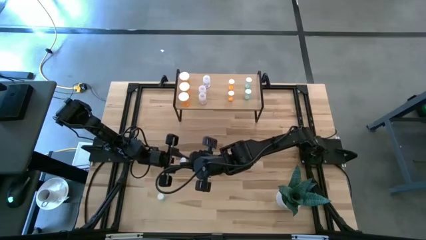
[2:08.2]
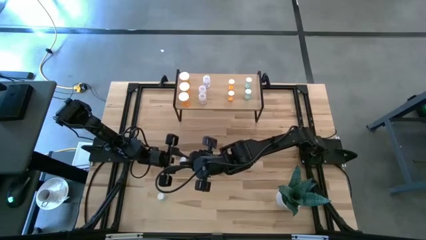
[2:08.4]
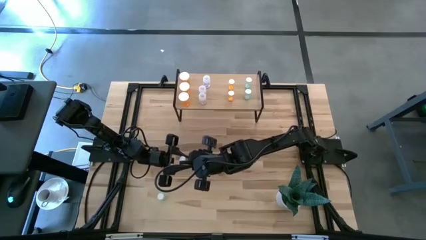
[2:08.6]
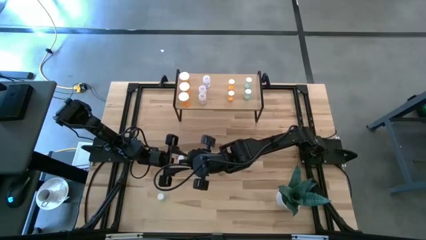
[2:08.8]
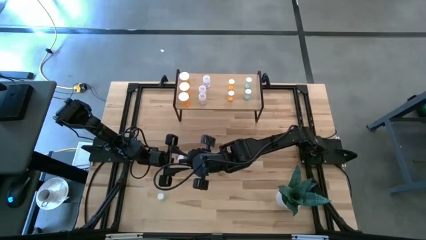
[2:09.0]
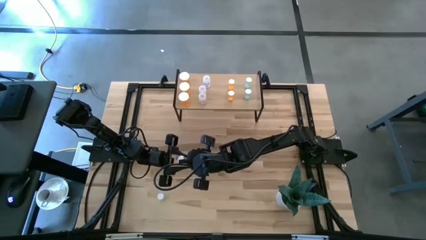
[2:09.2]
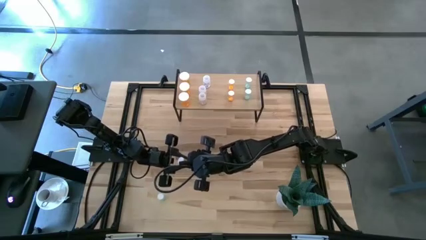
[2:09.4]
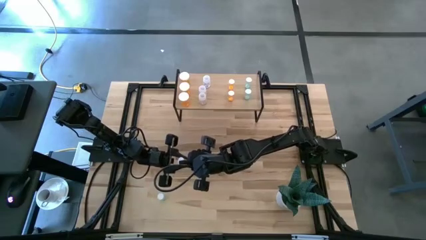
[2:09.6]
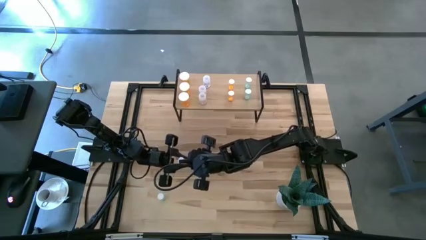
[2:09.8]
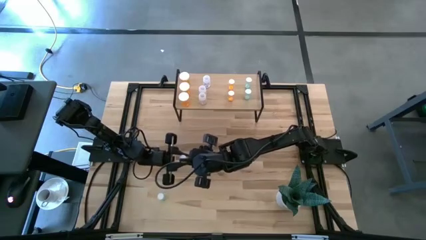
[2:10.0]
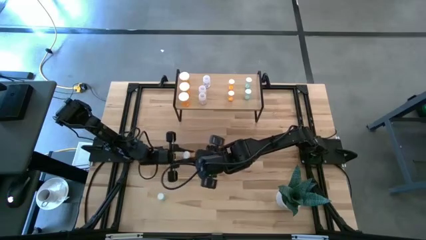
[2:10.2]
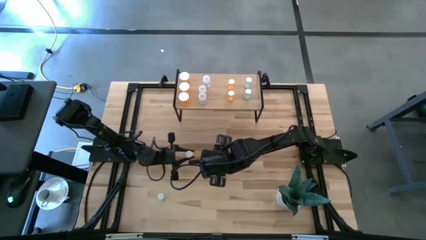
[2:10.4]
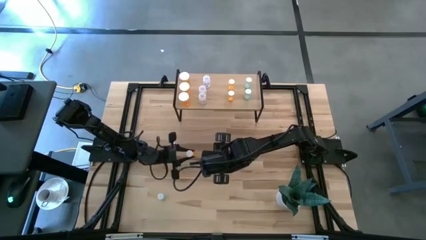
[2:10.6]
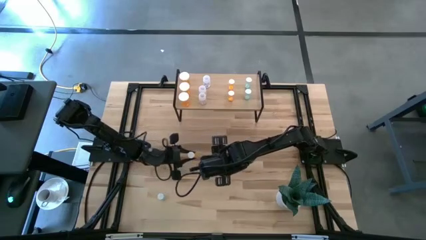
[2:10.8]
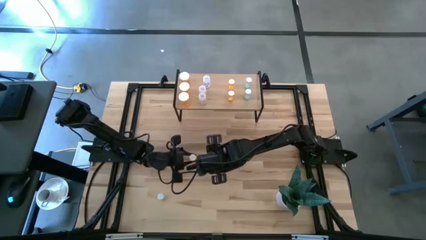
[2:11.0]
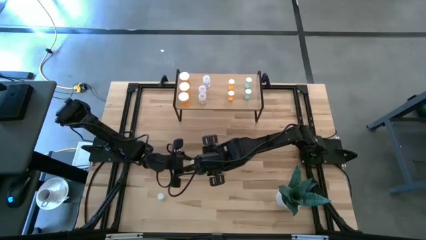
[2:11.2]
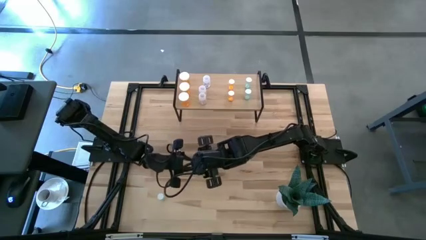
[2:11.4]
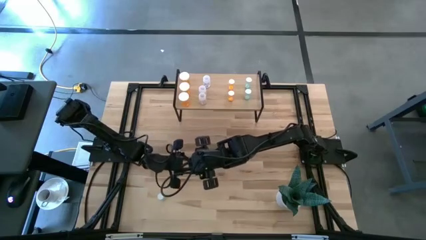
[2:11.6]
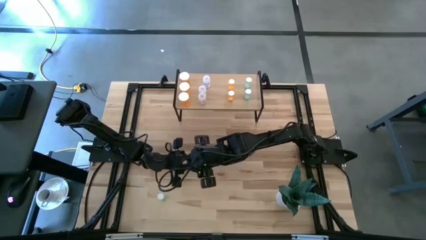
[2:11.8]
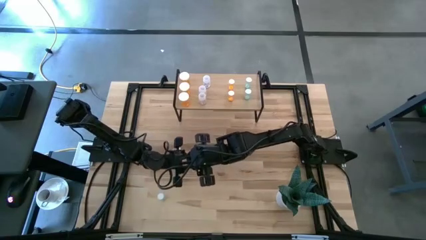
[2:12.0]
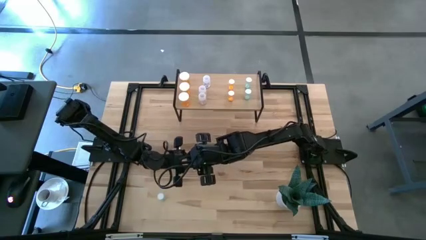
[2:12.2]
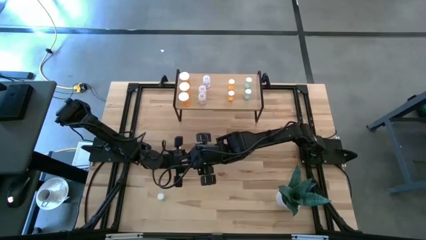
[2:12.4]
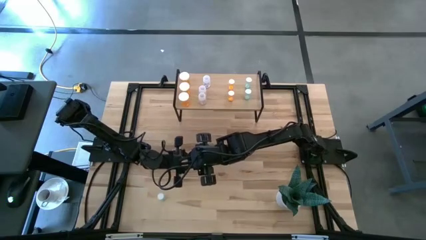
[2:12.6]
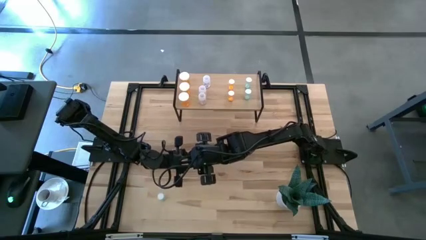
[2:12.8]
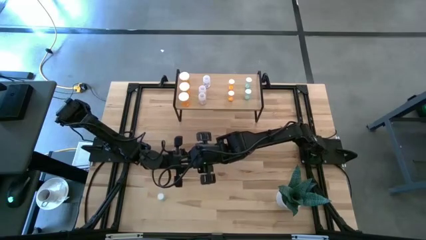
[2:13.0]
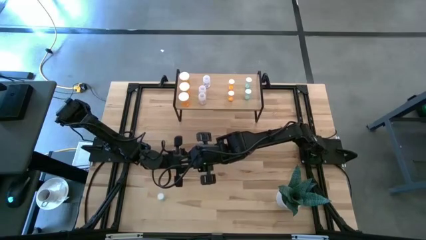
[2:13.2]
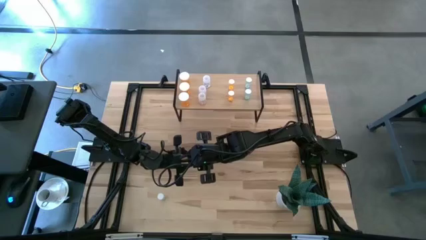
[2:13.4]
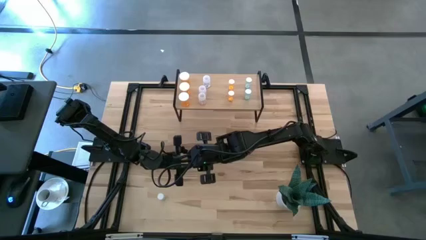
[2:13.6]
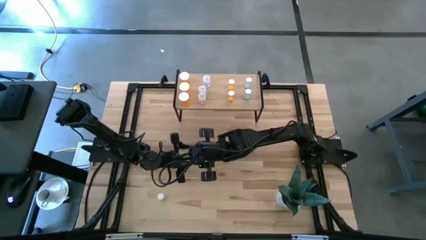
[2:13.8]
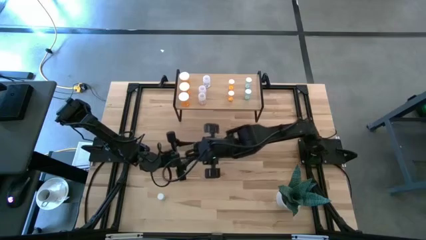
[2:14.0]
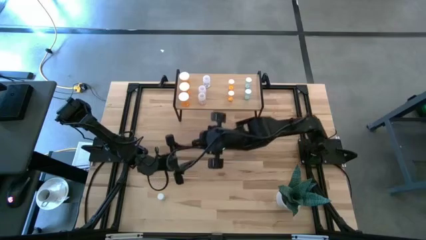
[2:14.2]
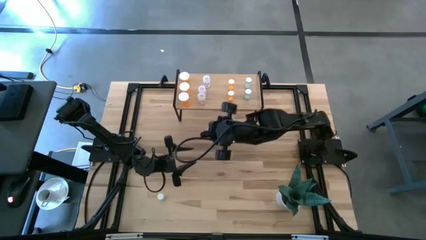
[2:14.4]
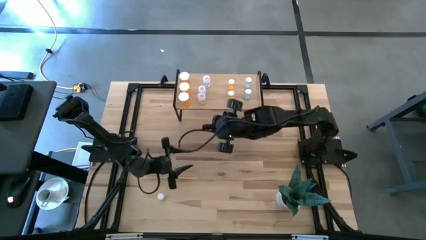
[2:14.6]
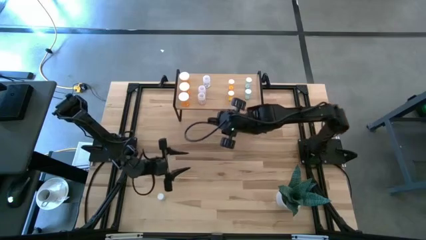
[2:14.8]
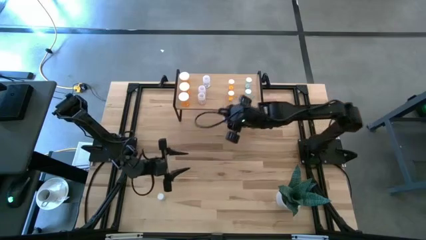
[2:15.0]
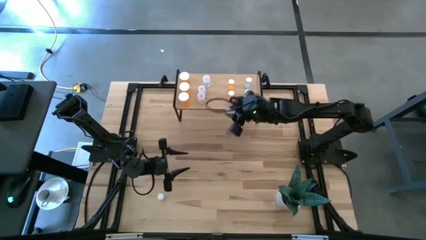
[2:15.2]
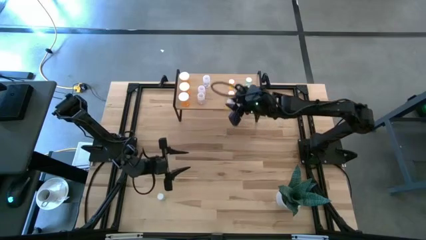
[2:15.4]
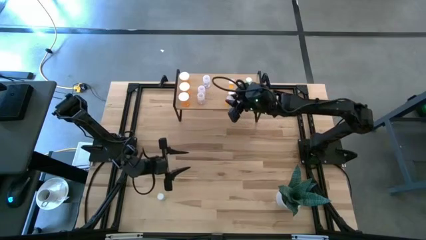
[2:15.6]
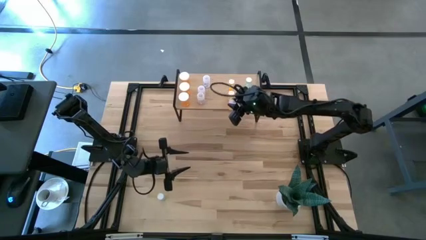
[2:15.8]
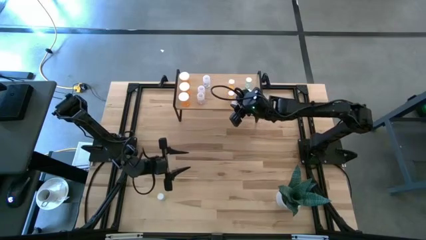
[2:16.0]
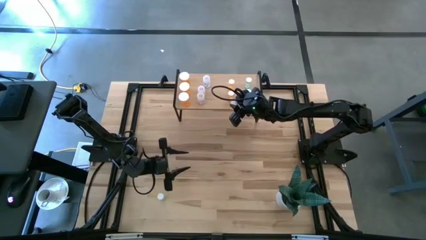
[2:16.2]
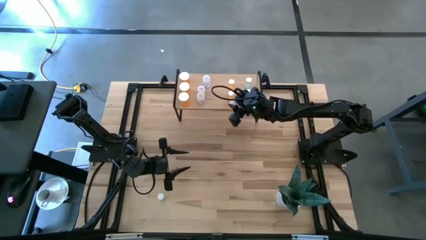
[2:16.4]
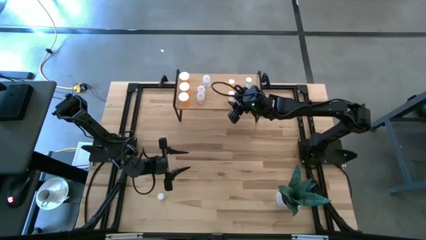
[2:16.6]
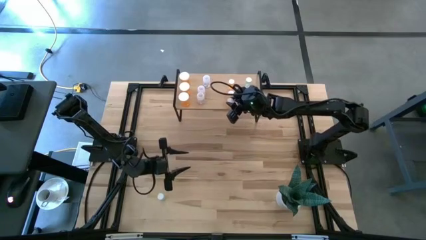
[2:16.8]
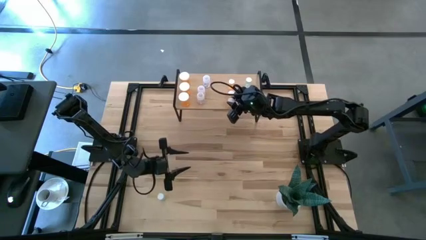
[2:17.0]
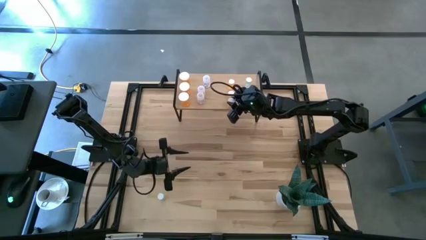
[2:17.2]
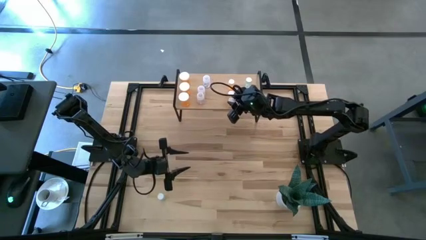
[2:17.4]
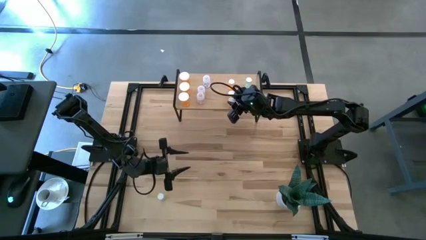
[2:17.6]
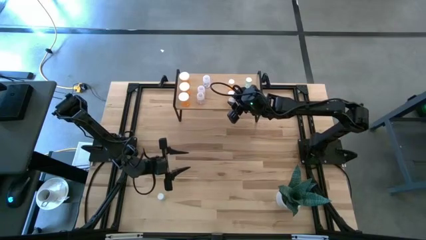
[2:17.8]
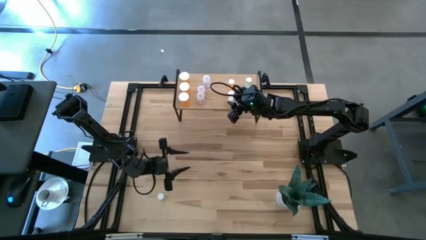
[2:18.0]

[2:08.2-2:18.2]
Task: Pick and place medicine bottles onto shelf by color
Put the small orange pill bottle on the shelf aligned with the other small orange pill bottle

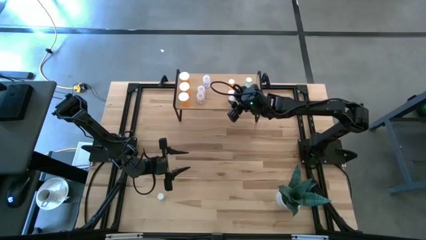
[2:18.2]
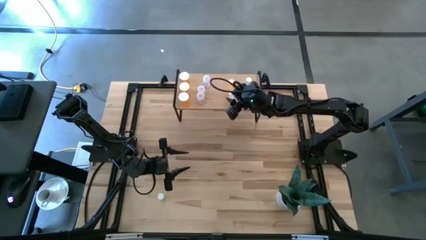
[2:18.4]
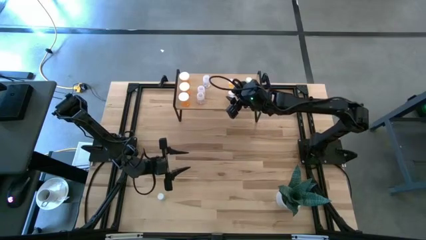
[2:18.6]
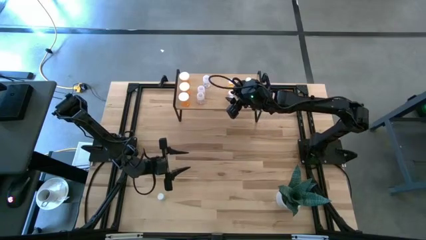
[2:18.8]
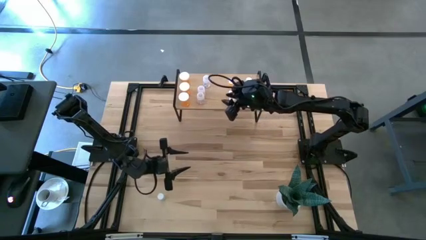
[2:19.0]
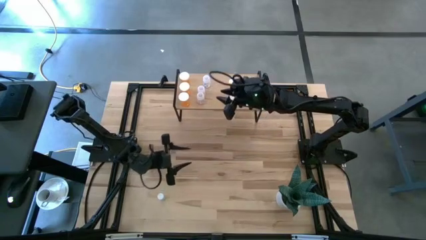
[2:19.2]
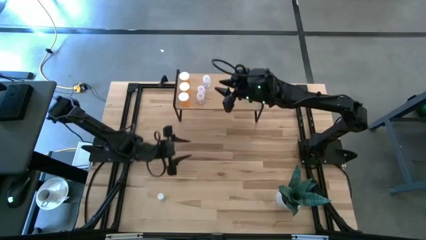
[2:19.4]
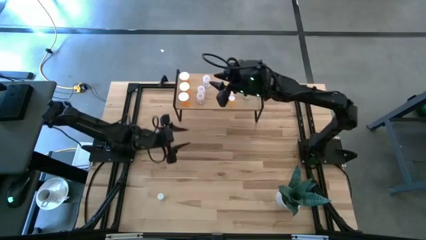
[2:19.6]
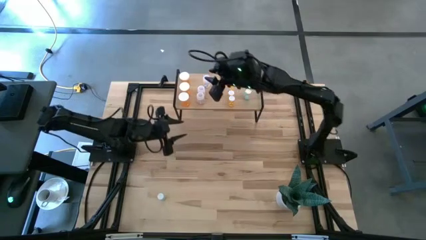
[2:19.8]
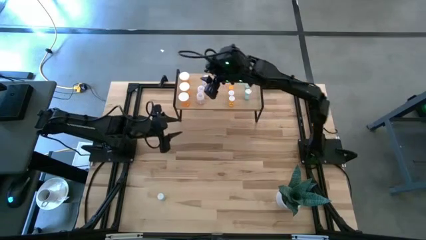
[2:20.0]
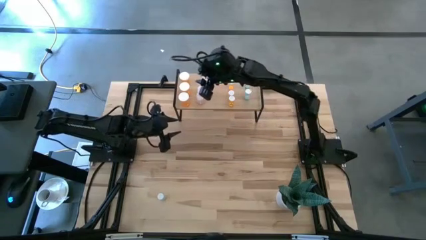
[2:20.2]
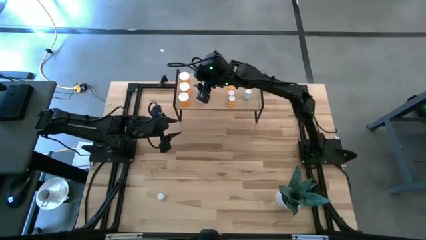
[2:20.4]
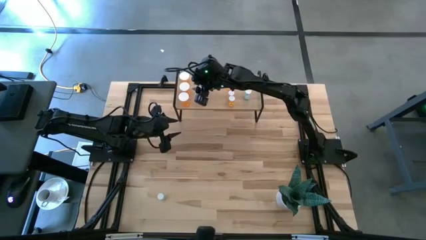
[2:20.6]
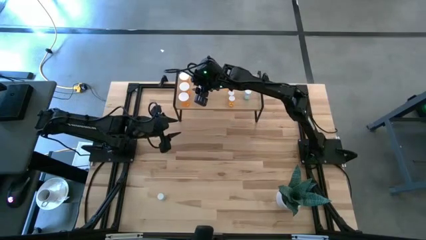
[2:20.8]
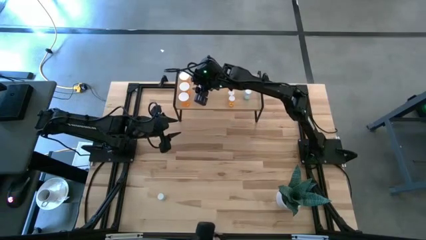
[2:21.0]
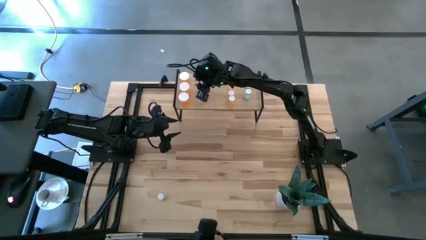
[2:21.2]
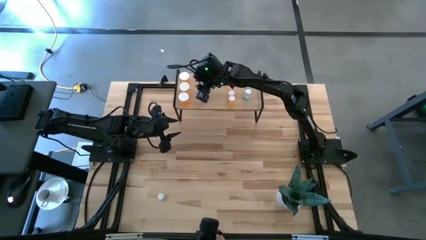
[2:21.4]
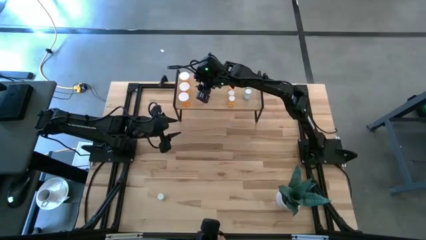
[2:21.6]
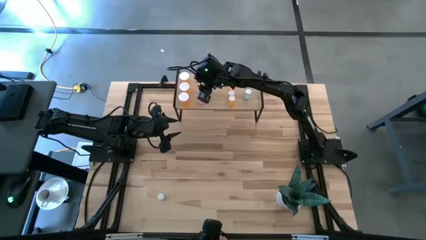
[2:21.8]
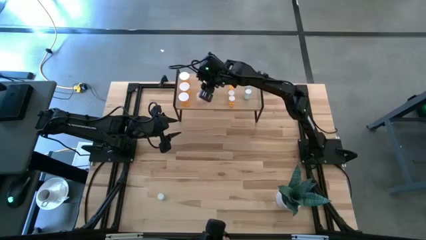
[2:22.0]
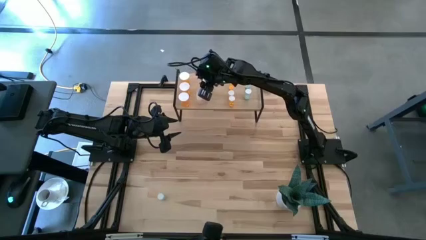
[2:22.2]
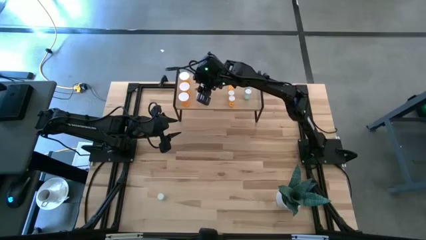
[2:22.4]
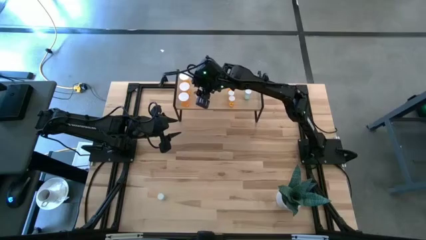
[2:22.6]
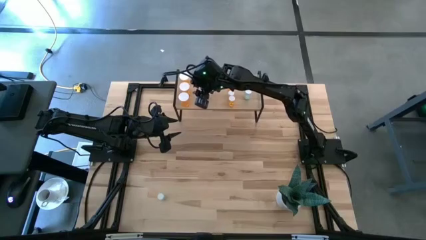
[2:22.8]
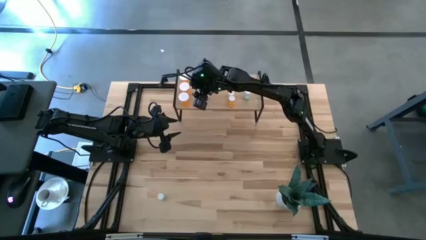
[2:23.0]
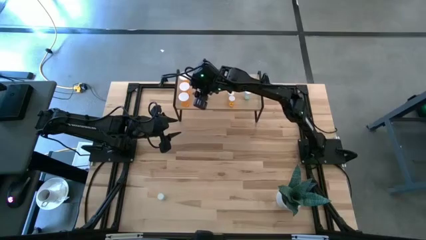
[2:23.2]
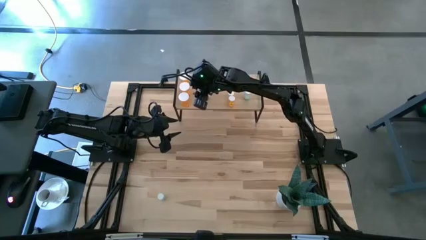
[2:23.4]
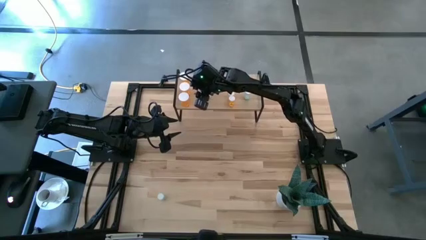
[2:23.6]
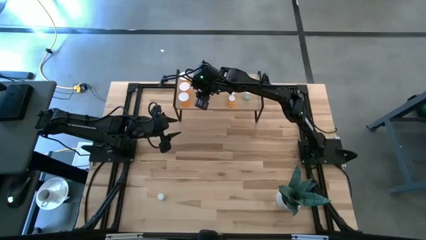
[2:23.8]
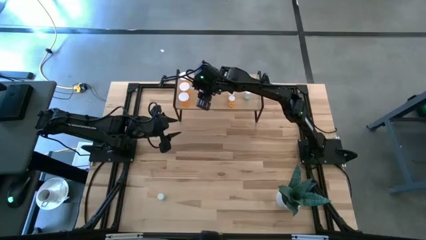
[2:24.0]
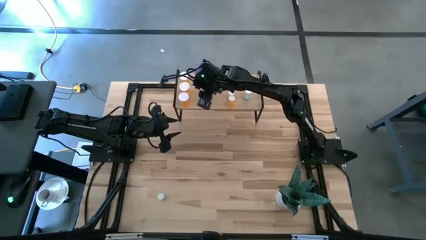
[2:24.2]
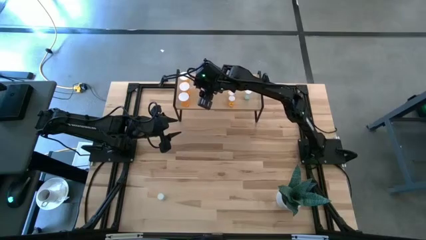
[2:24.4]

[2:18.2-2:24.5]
Adjust the transparent pill bottle on the shelf
